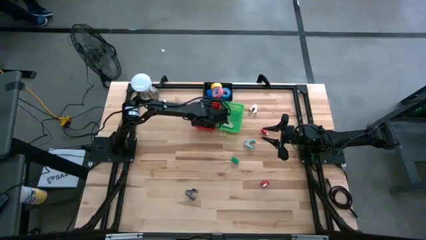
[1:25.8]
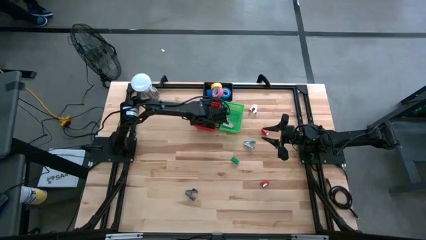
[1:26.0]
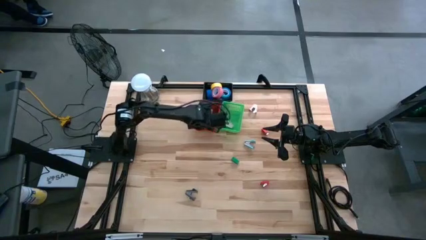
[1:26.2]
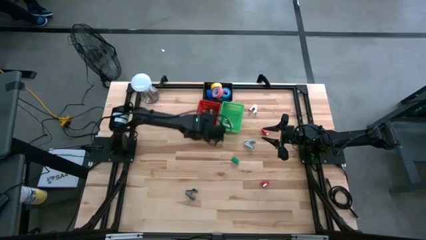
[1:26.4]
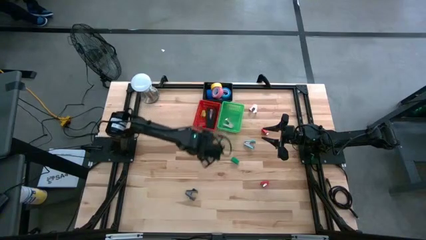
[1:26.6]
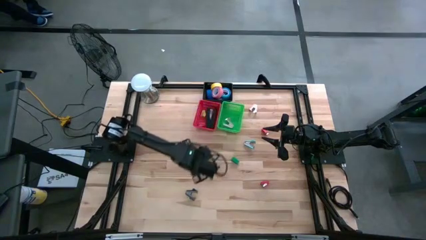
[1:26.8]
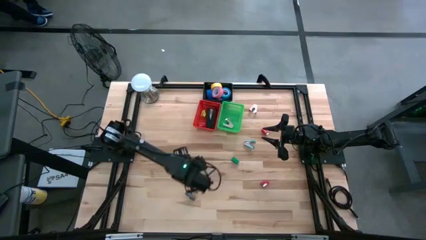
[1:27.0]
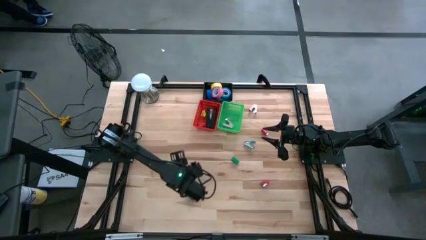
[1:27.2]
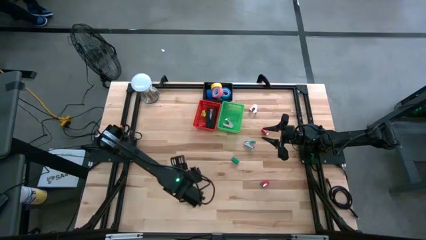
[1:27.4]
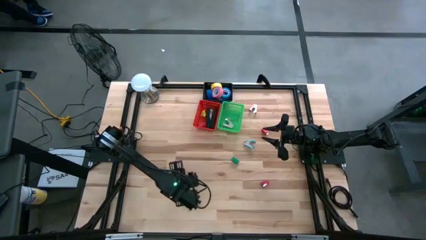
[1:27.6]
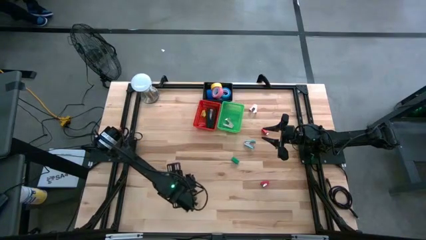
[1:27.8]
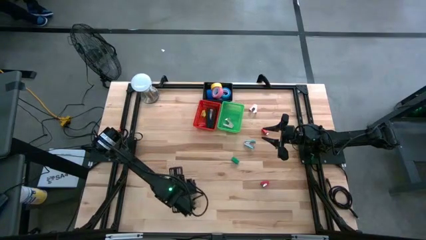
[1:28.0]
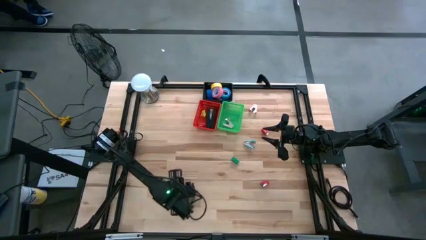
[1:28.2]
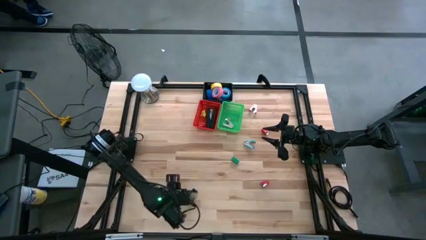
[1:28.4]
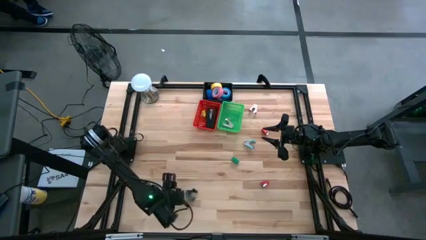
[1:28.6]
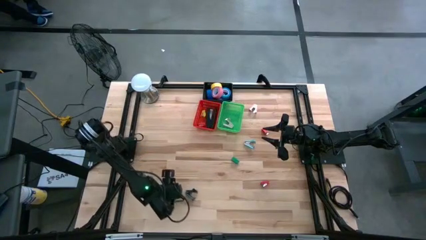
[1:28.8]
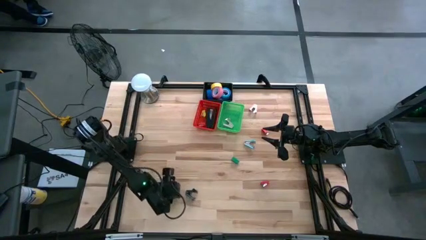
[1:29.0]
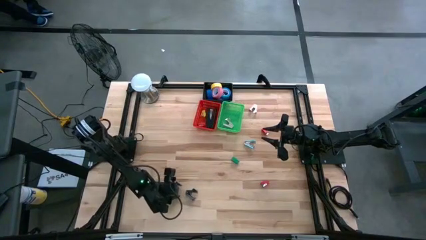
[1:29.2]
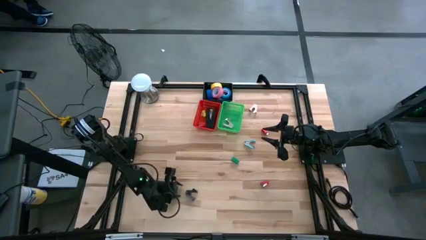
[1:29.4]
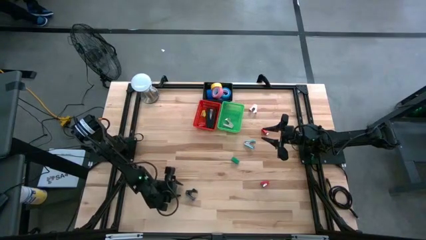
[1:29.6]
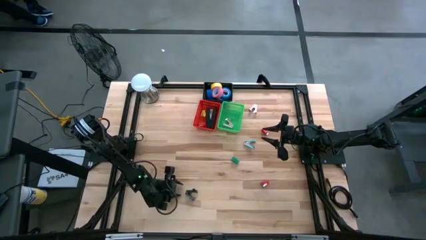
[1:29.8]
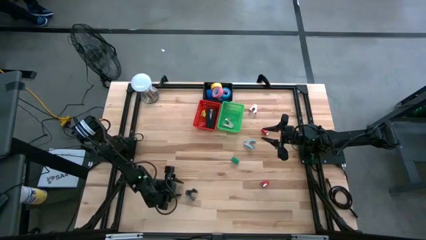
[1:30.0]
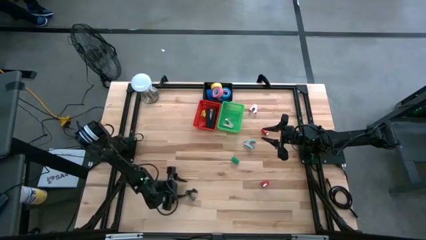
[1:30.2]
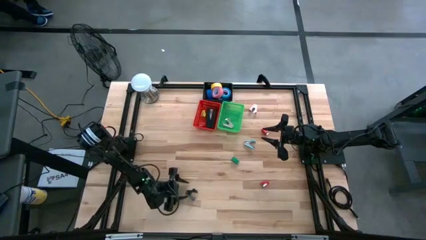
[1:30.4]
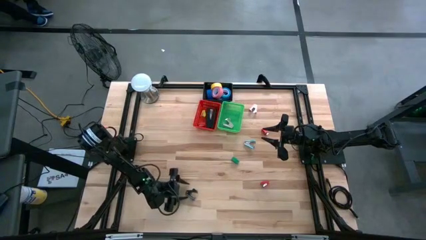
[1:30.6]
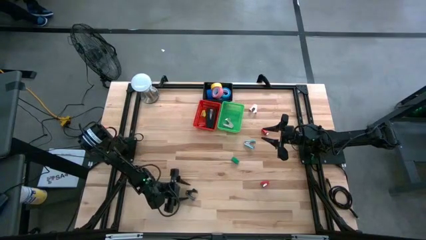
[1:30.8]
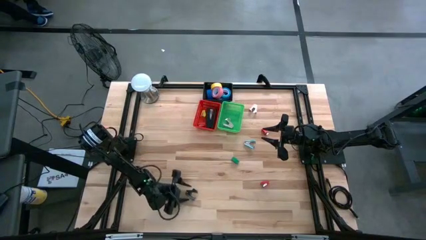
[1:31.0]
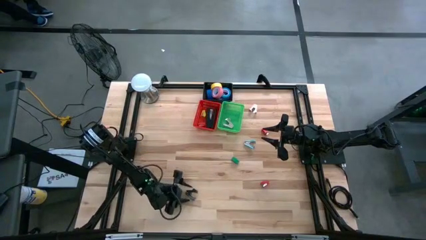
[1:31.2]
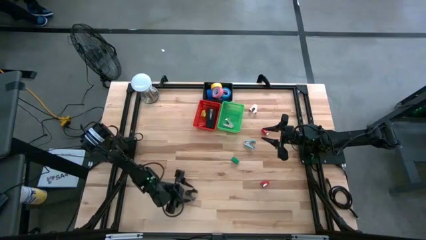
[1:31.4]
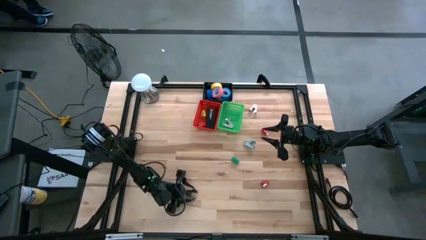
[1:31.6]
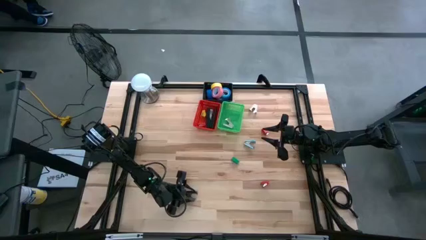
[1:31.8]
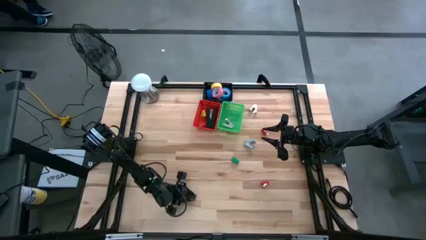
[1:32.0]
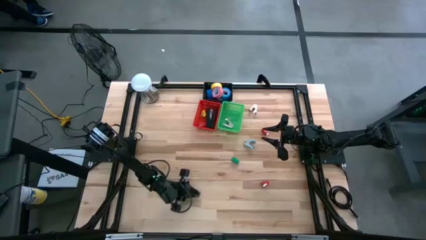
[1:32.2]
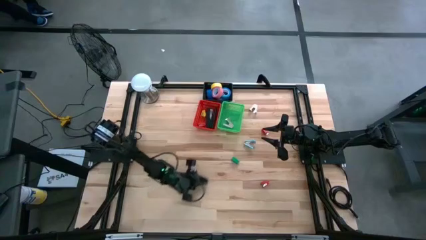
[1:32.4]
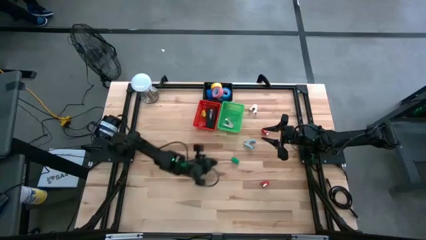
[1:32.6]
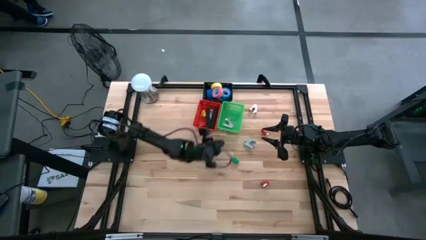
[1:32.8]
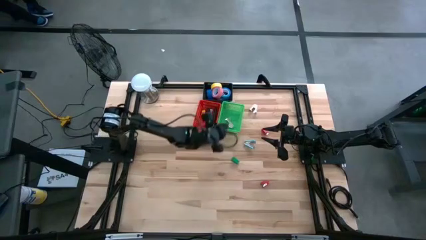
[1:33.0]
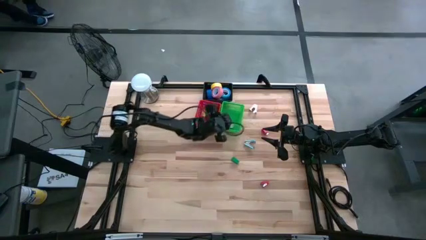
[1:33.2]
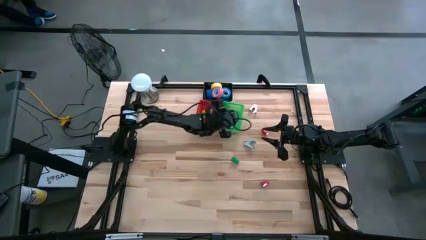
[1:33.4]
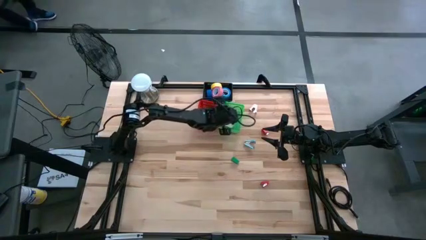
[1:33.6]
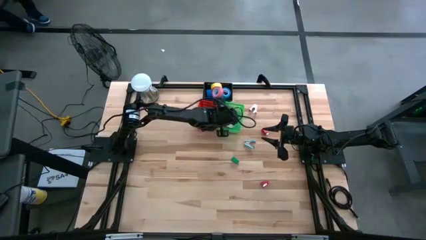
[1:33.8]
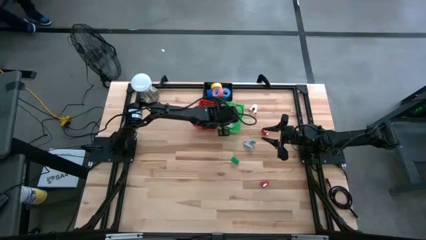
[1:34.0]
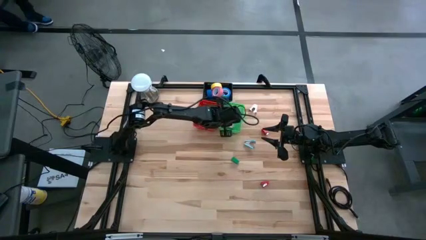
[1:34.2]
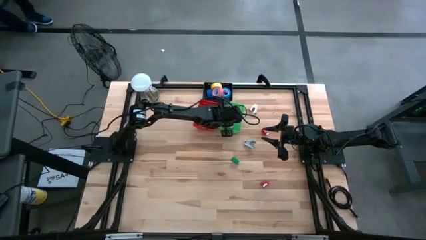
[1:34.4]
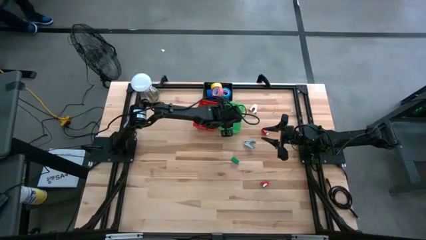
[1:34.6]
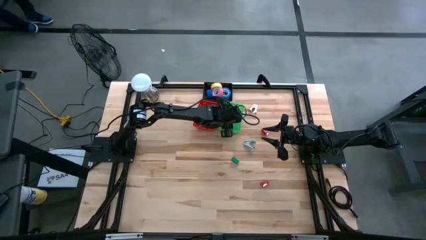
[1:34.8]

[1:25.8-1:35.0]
Task: Pick and place Stapler, Stapler remover, tape
Put the black staple remover into the green bin

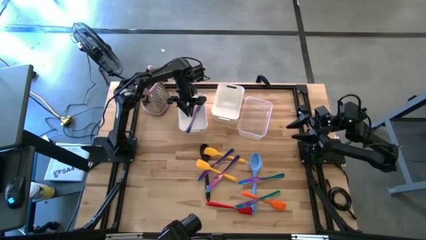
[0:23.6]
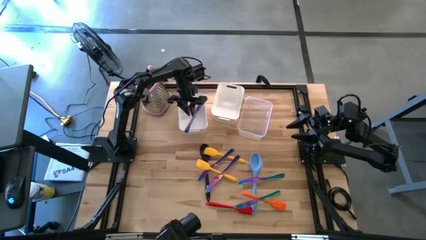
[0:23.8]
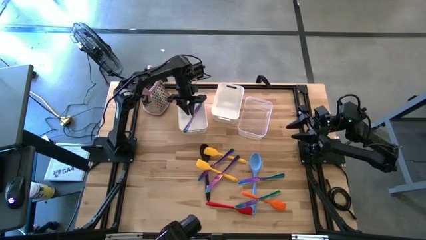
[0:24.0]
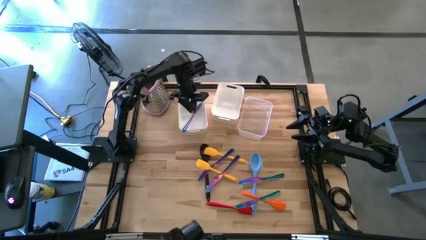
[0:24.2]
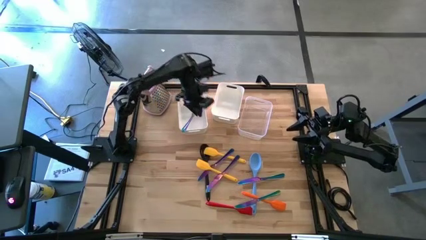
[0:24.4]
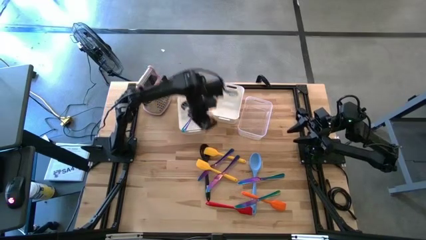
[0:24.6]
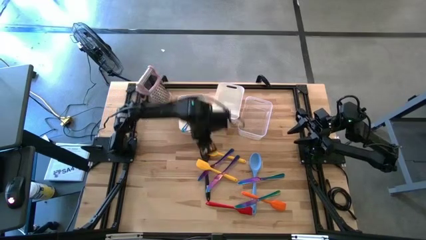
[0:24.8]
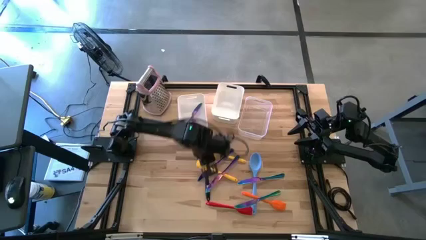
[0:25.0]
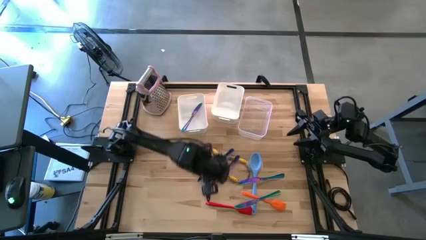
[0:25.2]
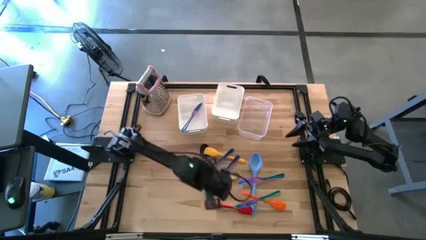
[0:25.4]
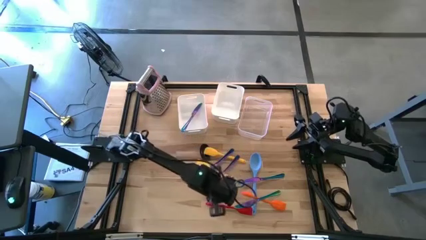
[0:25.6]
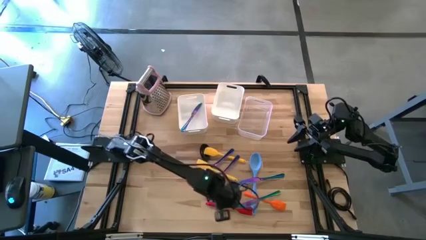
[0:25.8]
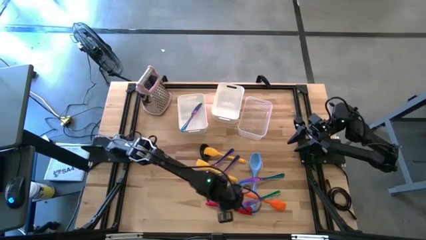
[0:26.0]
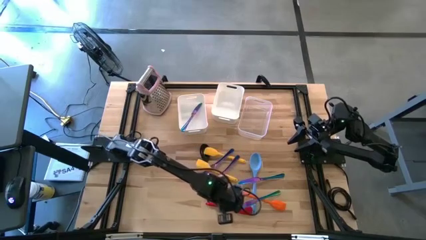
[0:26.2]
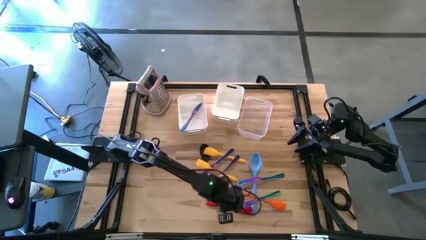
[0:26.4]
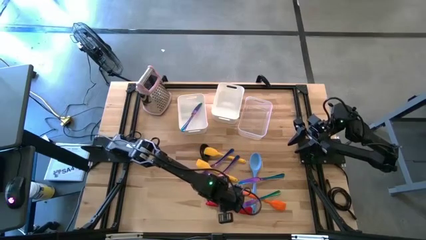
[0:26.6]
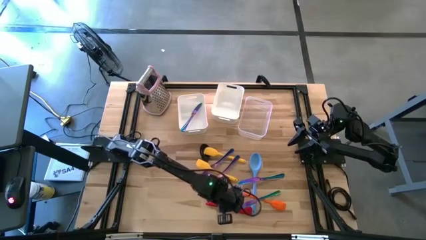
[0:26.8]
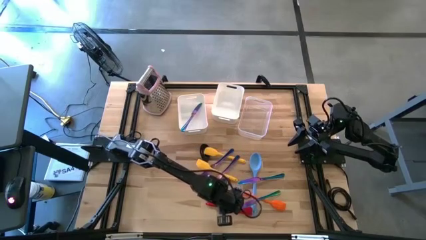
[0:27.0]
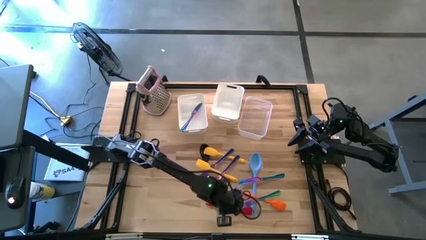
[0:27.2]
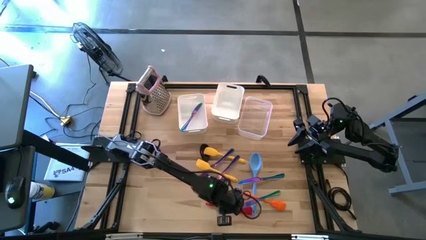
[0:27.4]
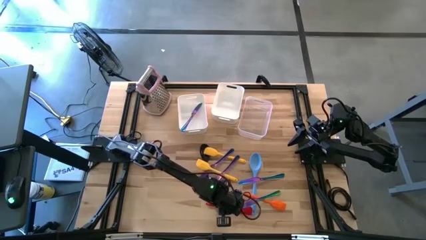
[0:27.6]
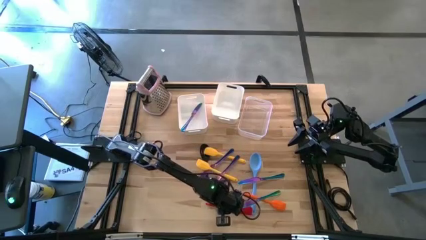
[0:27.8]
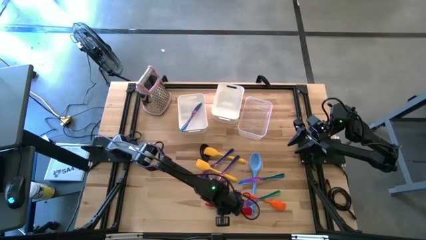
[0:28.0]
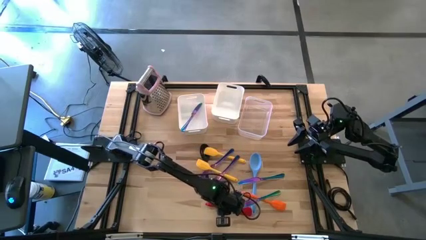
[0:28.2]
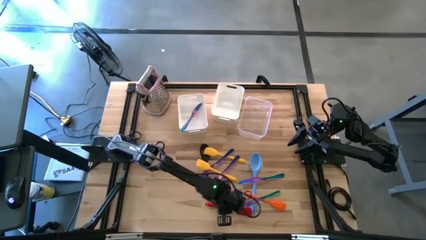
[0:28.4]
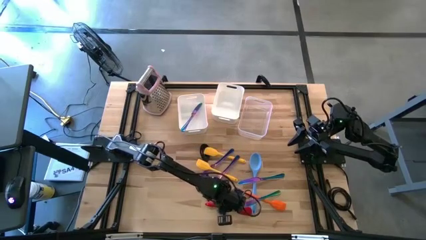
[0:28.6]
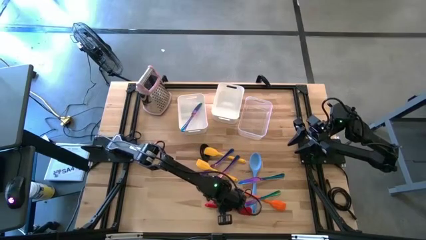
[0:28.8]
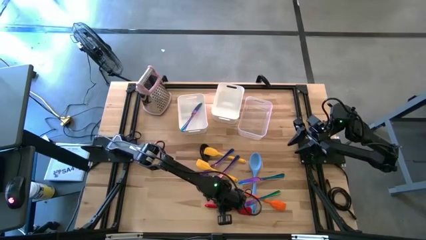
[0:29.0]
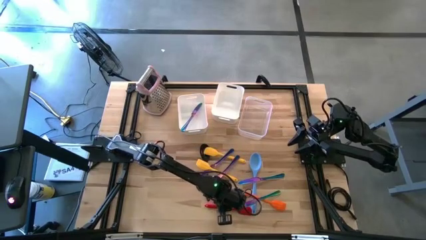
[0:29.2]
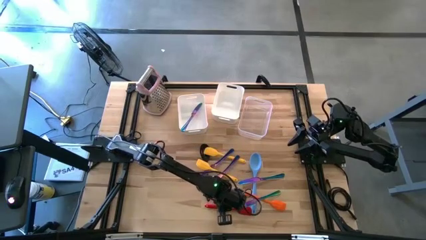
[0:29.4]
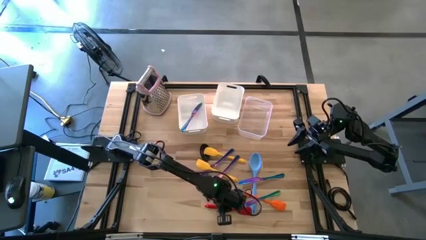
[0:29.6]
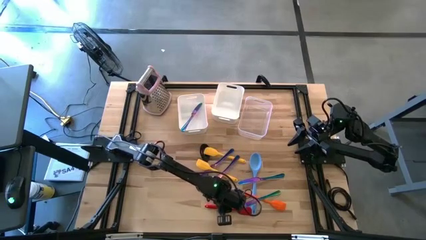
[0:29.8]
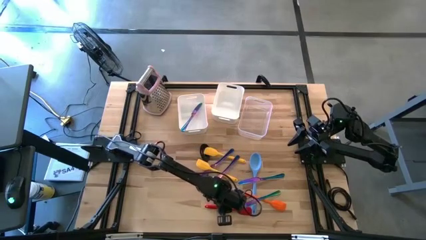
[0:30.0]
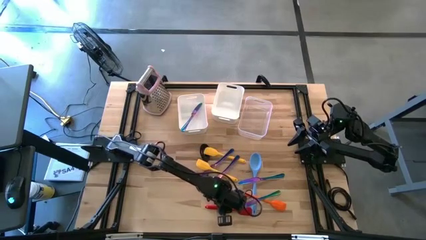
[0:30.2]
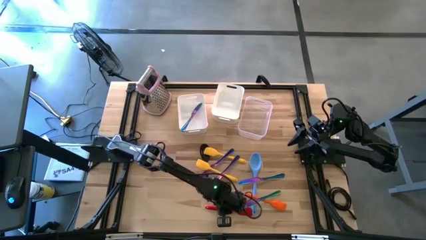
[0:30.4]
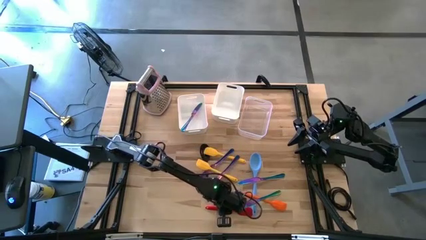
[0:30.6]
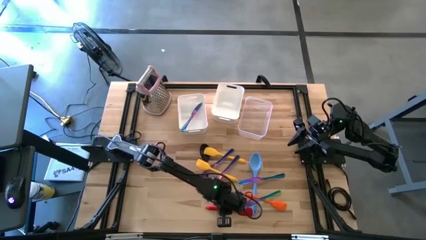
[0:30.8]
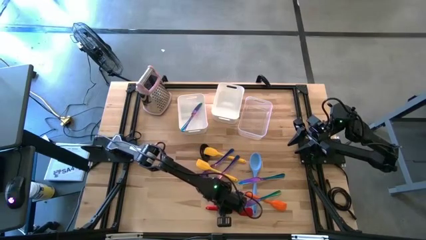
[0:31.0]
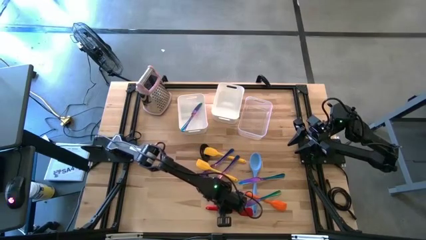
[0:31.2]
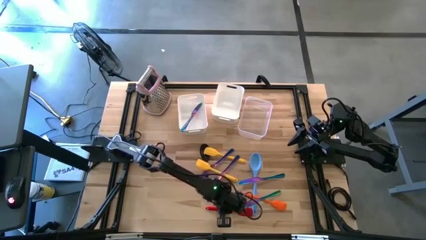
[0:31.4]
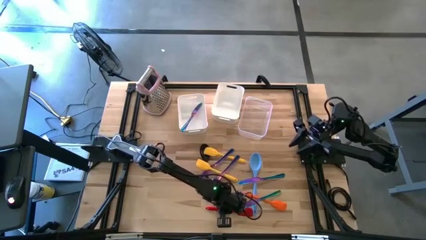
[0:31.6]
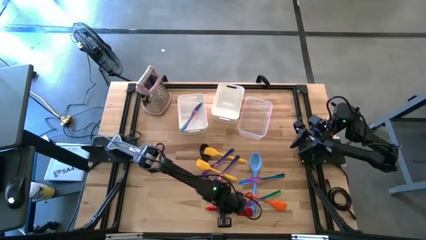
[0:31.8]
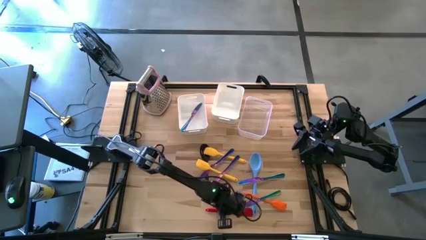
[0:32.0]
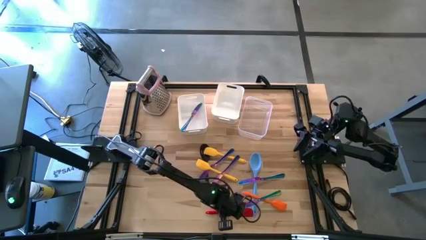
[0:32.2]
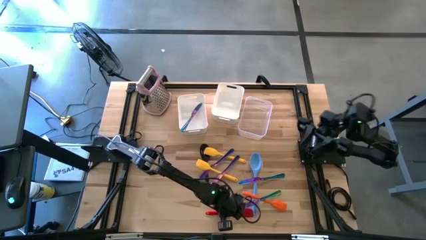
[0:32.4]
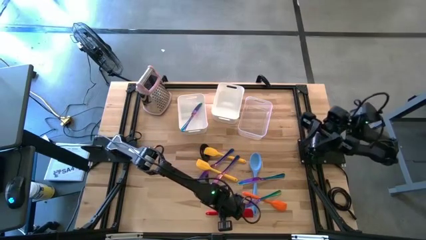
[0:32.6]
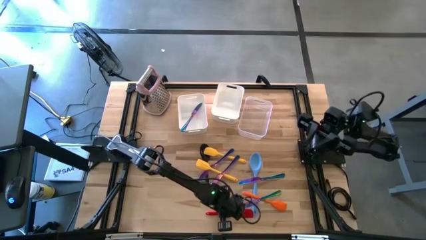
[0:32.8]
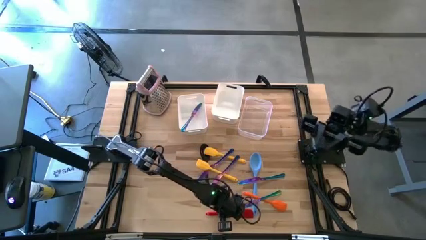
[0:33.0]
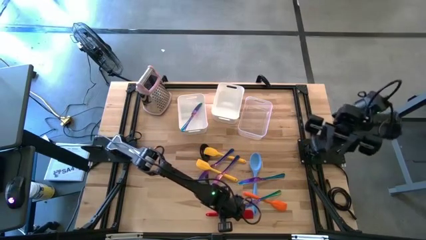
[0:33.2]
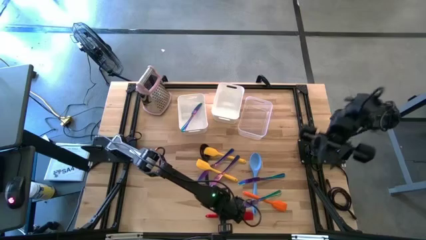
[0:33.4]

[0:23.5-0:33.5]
Task: Pick & Place Kitchen Items
Put the red spatula into the transparent bin
